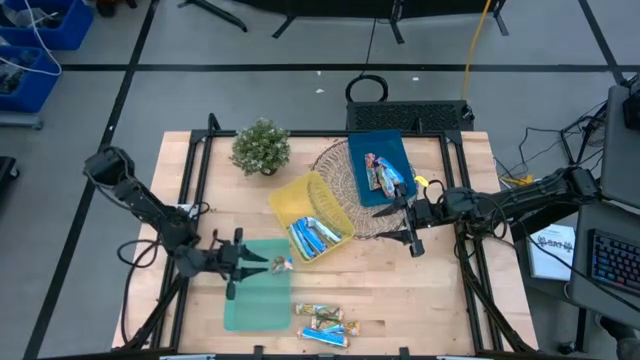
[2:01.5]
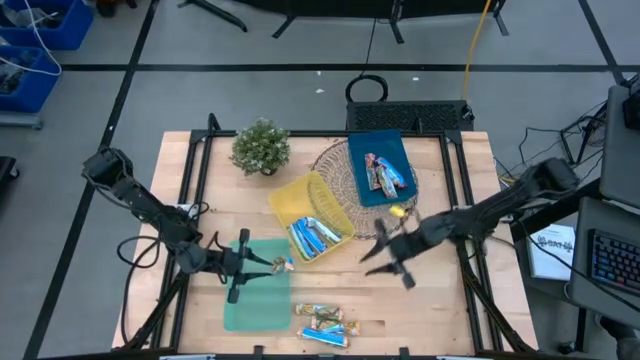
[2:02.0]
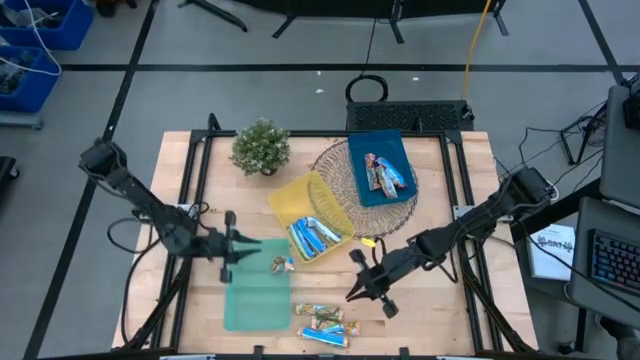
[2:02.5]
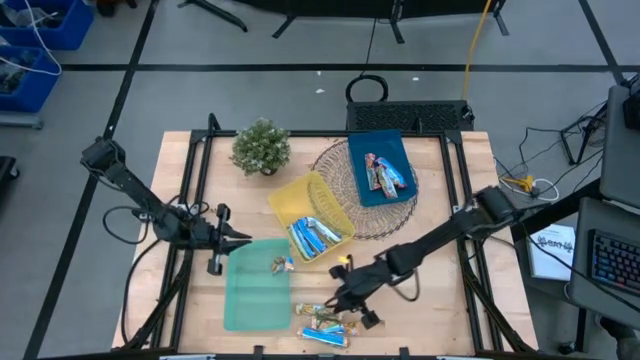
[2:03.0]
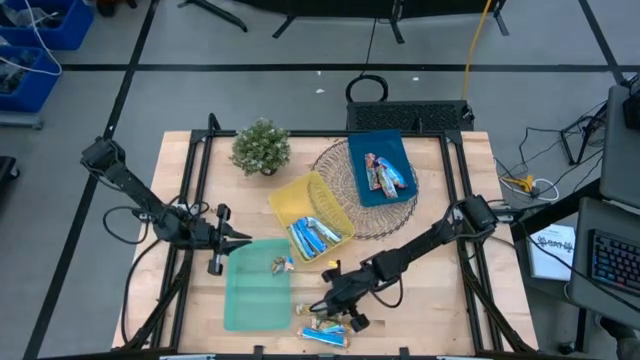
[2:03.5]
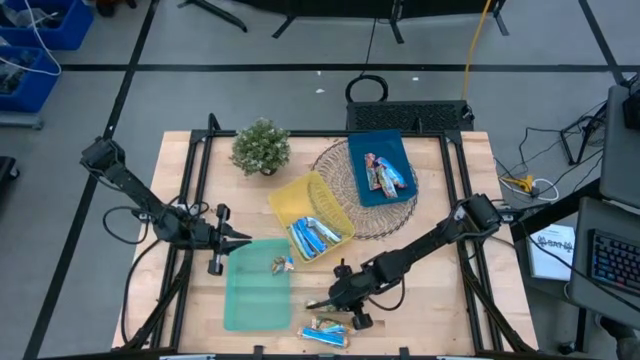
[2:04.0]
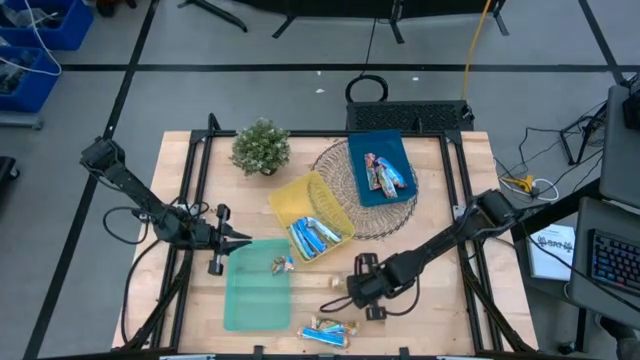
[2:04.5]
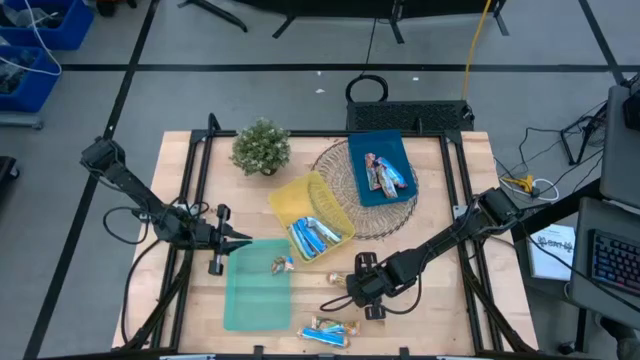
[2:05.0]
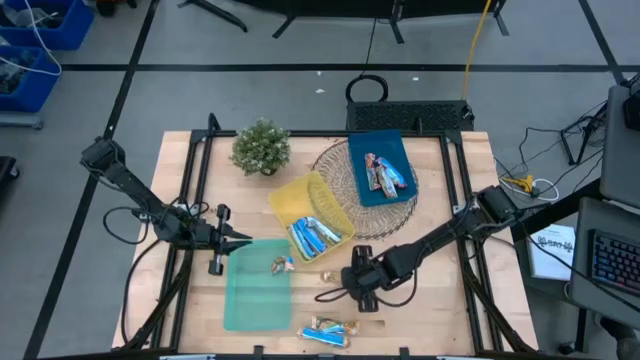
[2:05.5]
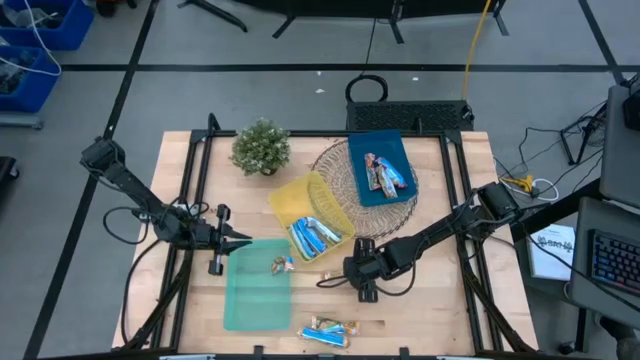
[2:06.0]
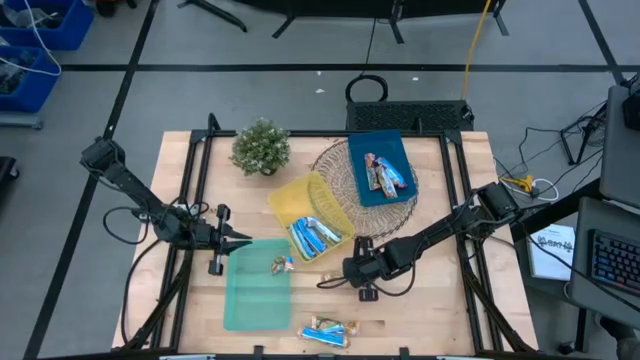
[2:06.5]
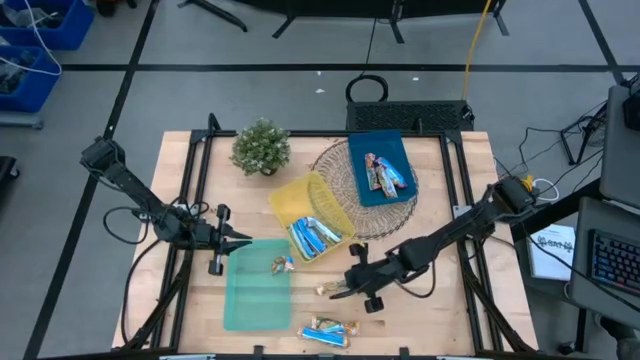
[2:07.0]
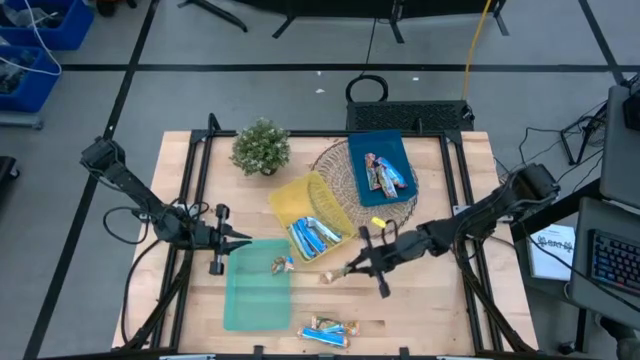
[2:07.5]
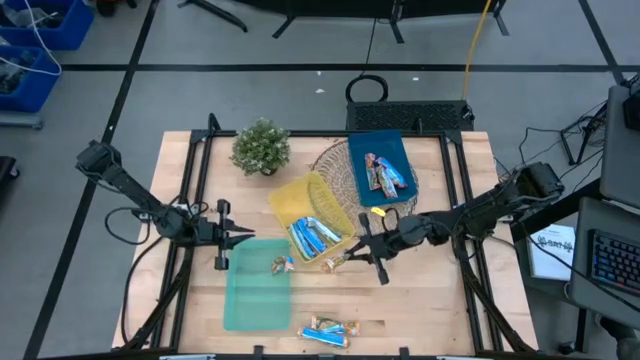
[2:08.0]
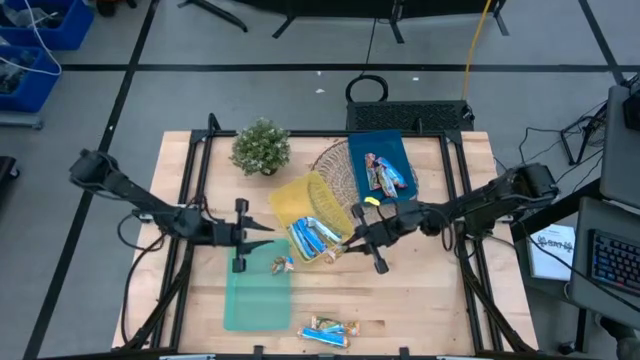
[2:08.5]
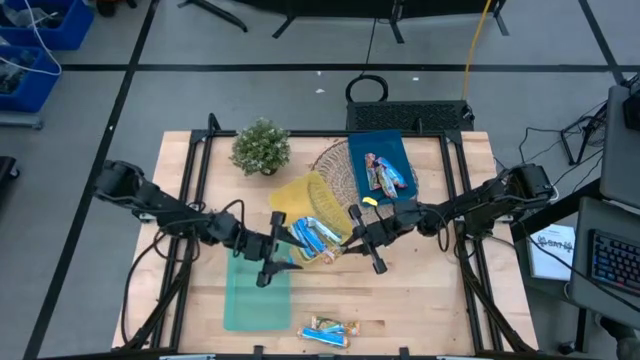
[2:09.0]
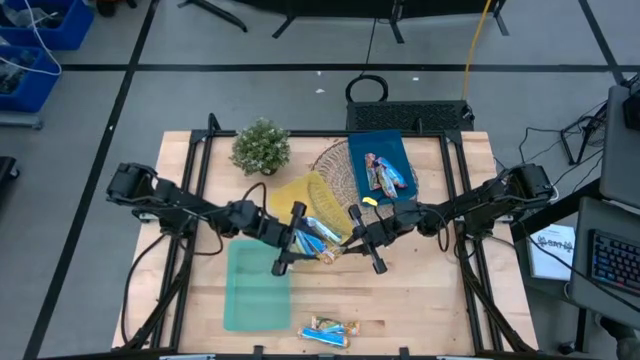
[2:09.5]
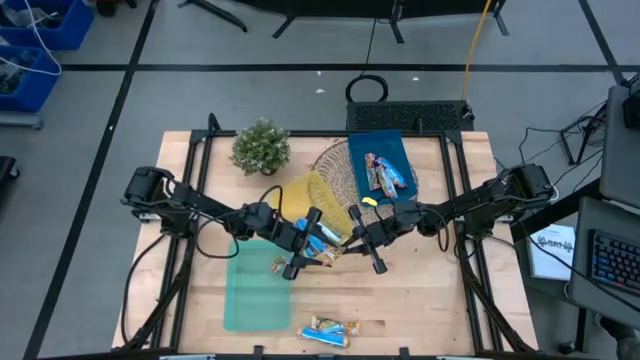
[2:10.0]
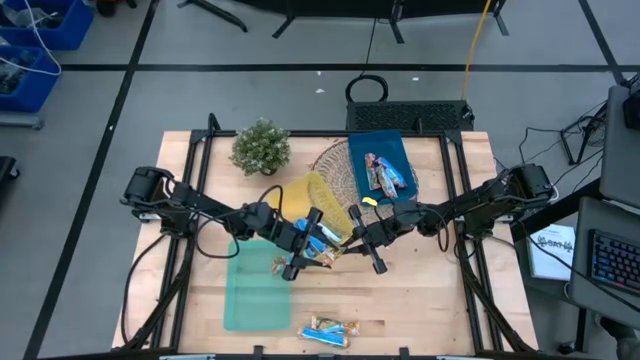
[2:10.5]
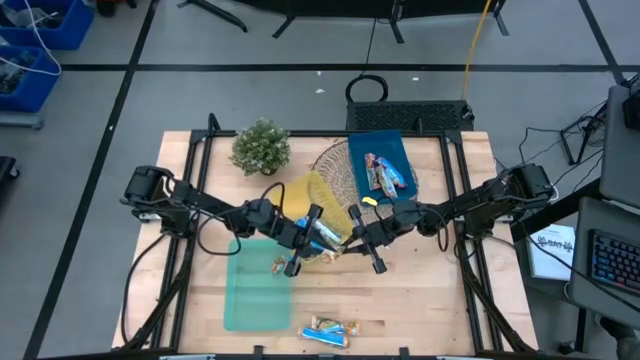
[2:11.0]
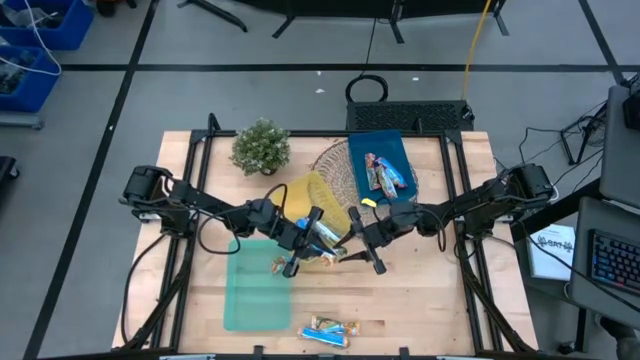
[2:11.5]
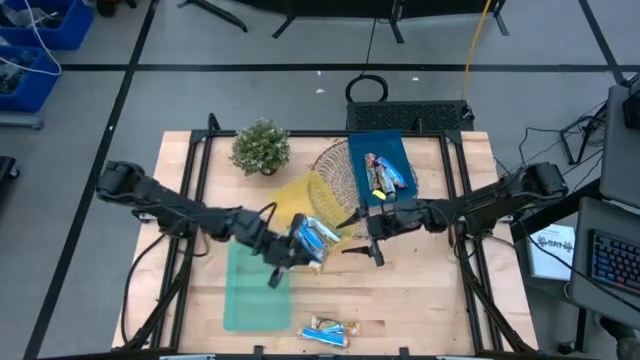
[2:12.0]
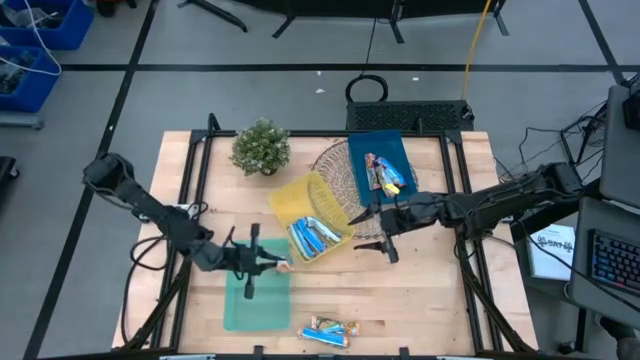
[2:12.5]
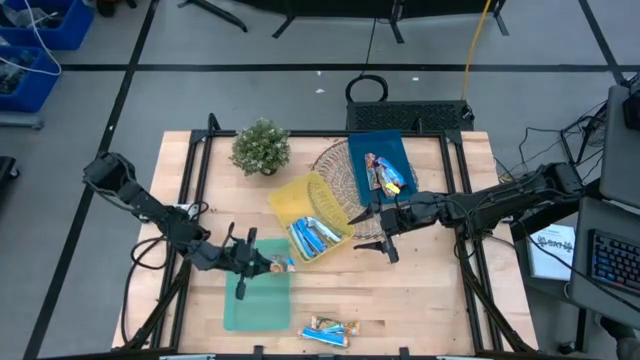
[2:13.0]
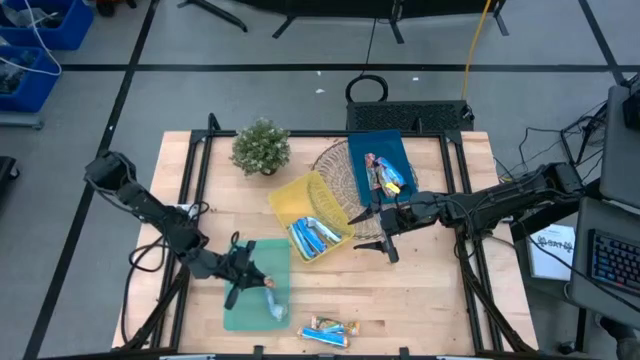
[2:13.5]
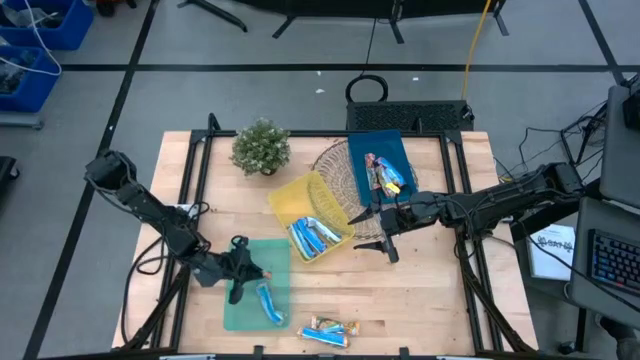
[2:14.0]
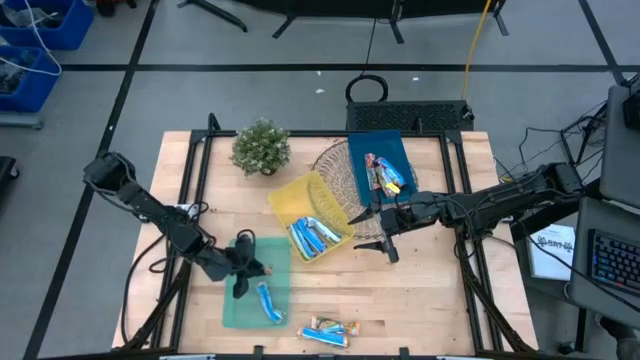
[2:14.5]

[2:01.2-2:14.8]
Task: Pick and place Granola Bars by type
Put the yellow granola bar into the green bin

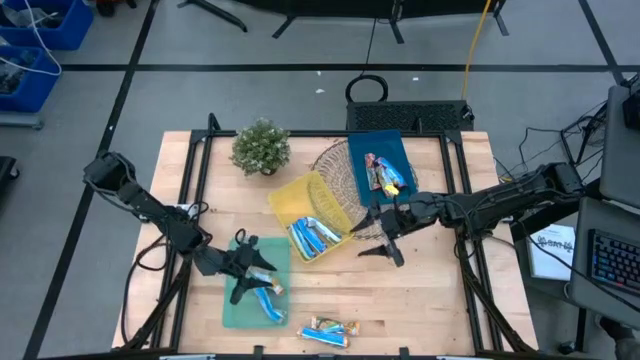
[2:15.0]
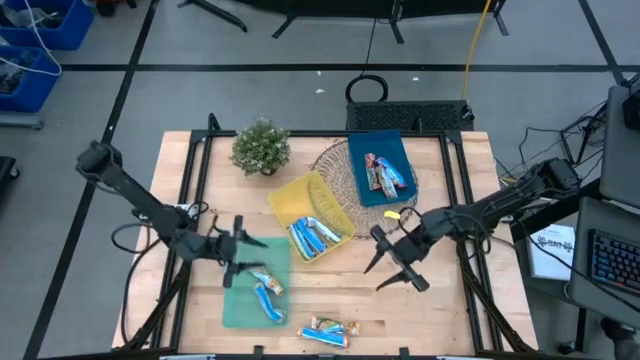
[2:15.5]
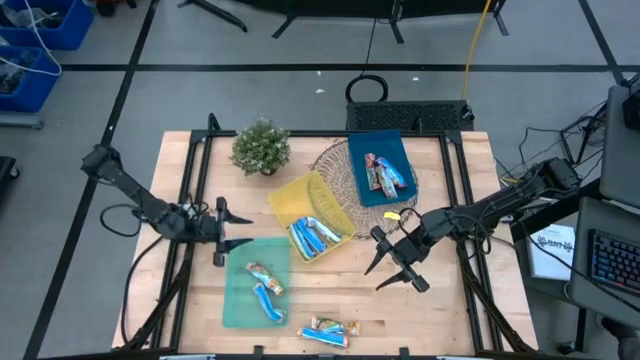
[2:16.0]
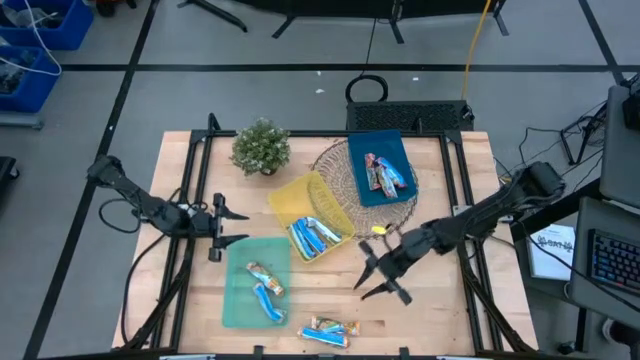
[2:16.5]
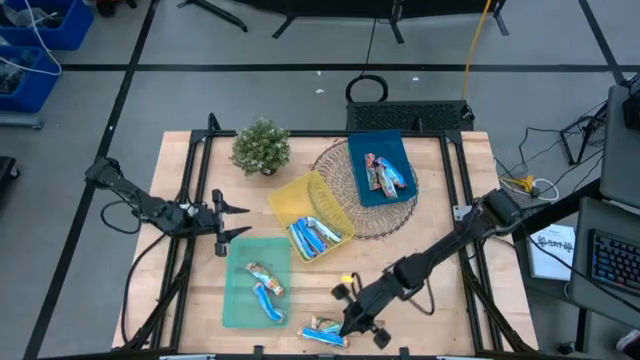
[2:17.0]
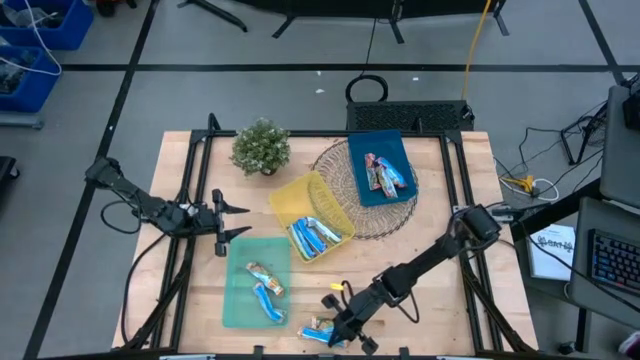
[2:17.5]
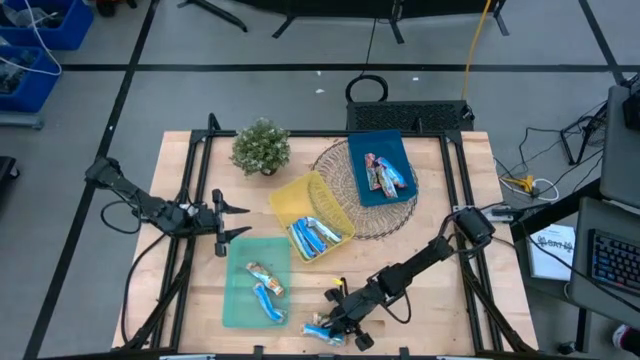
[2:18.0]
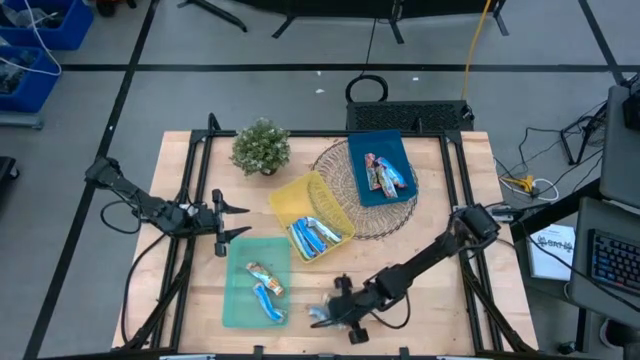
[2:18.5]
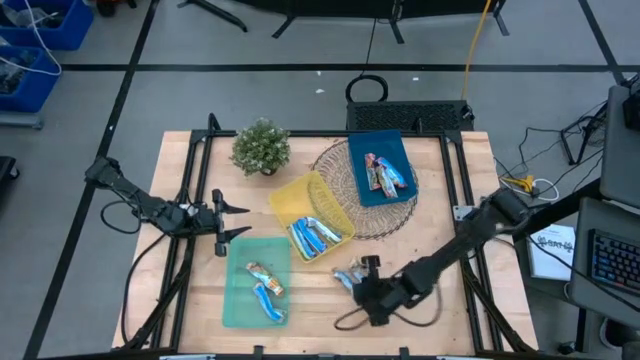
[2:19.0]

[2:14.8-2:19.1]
Adjust the yellow granola bars

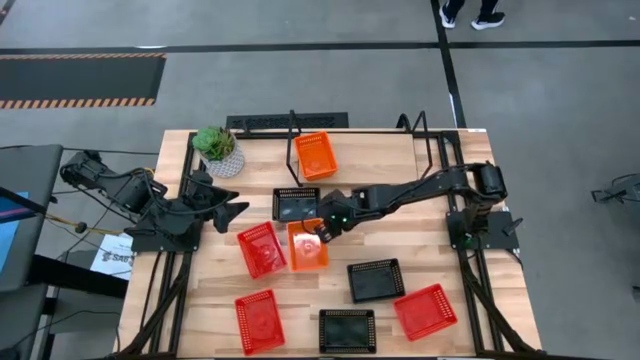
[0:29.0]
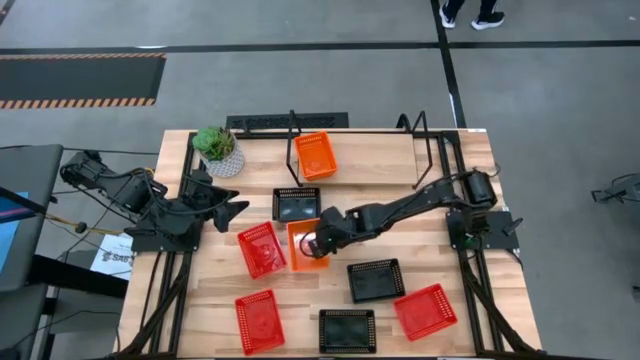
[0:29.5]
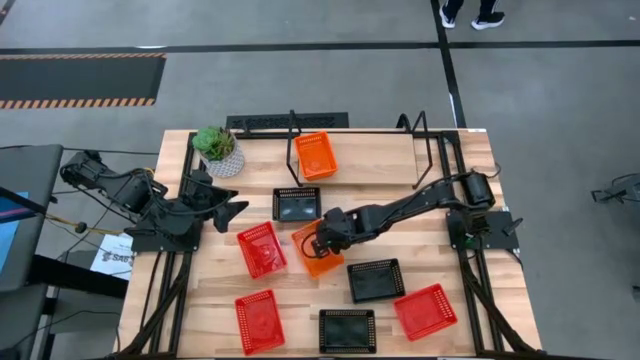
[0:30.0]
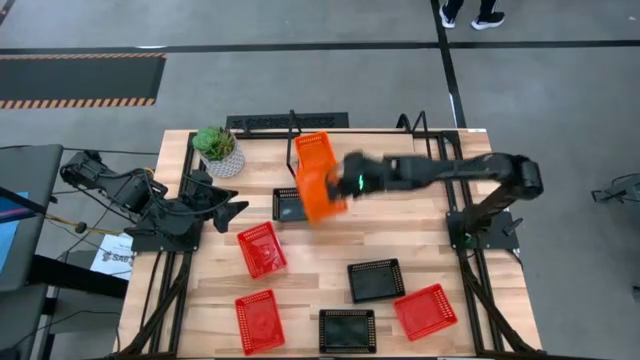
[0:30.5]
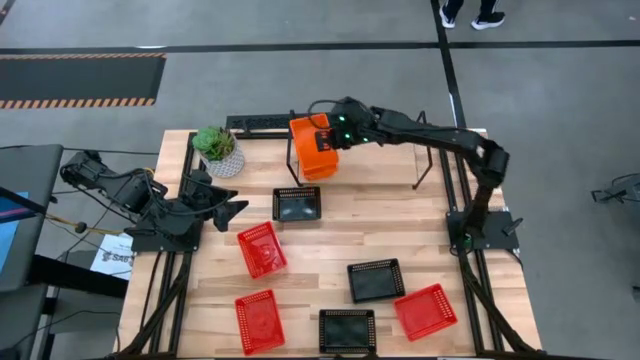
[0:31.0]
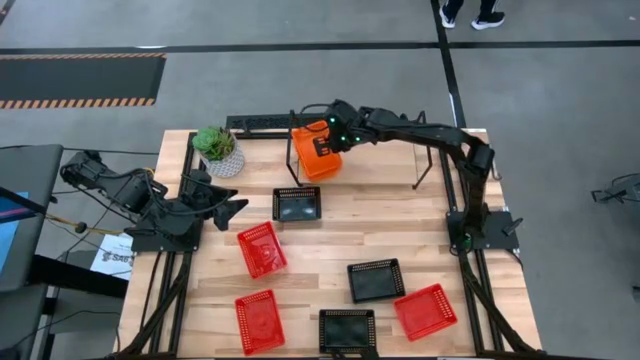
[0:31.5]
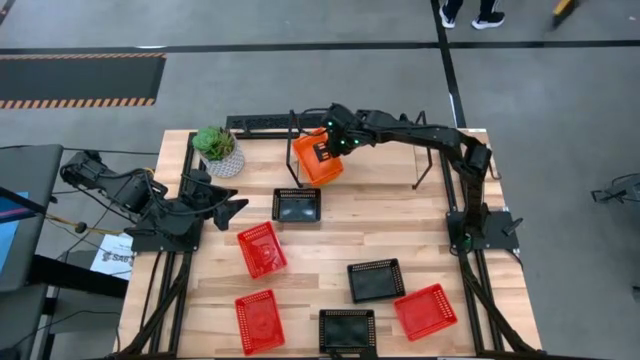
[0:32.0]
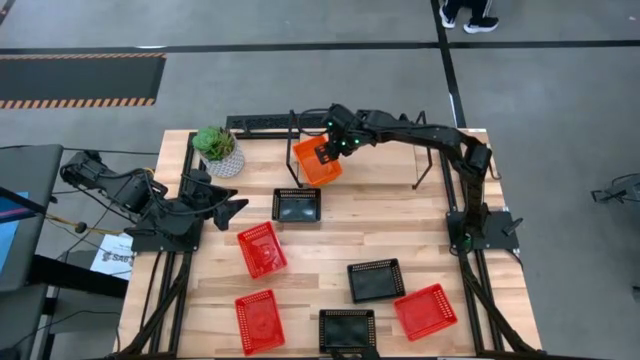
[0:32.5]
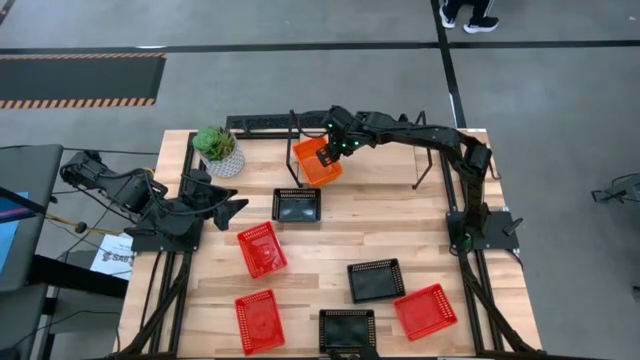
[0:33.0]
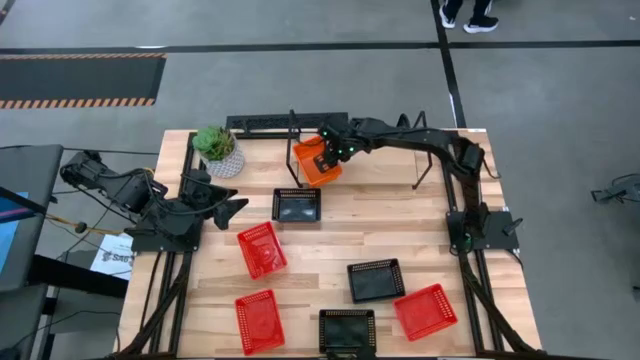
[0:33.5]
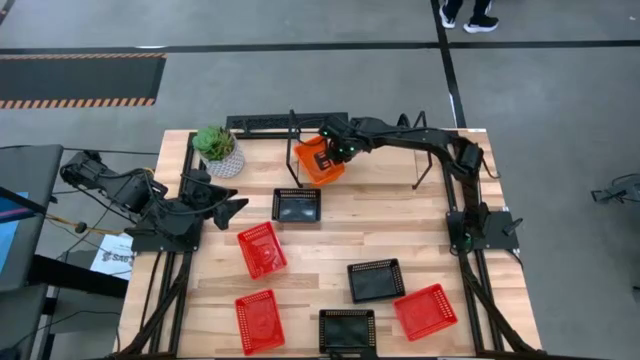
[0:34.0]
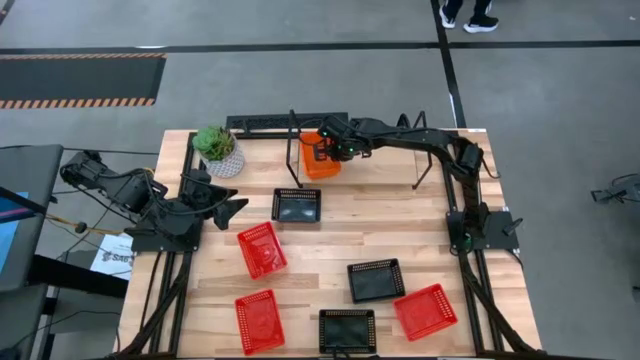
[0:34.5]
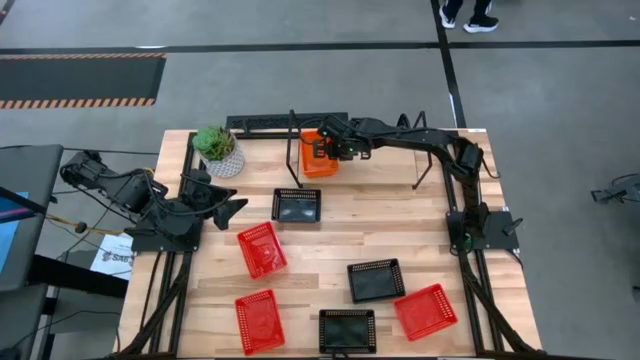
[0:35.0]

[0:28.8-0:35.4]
Task: Stack baskets on shelf by color
Stack the orange bin on top of the orange stacked bins on the shelf
